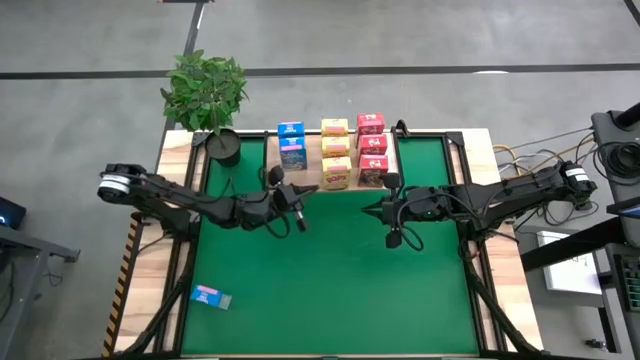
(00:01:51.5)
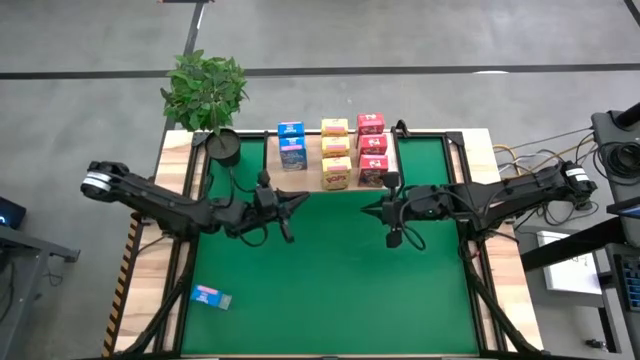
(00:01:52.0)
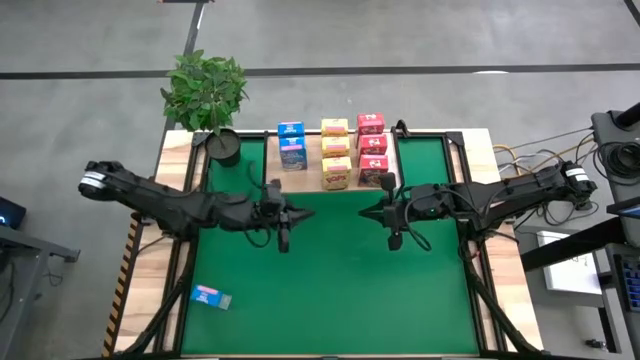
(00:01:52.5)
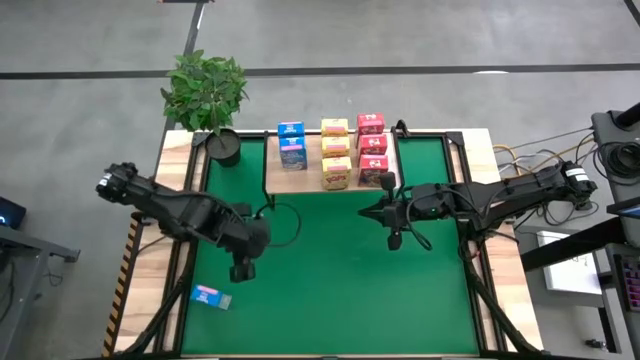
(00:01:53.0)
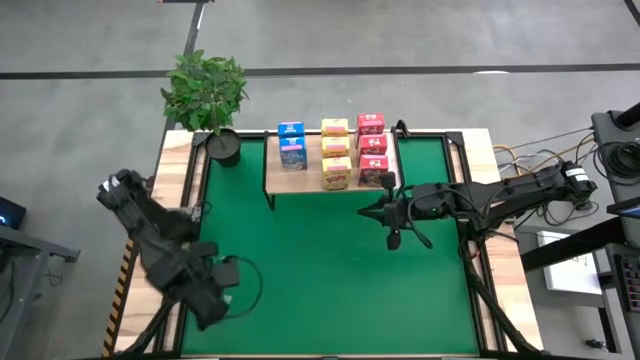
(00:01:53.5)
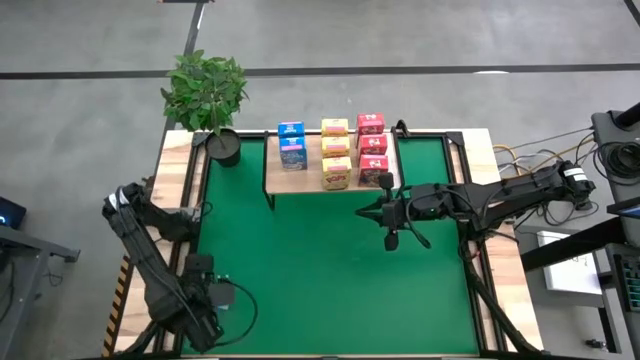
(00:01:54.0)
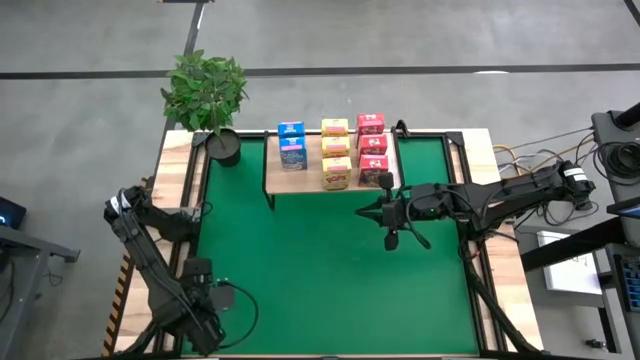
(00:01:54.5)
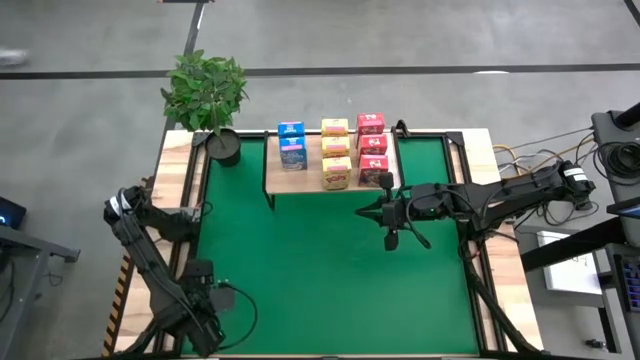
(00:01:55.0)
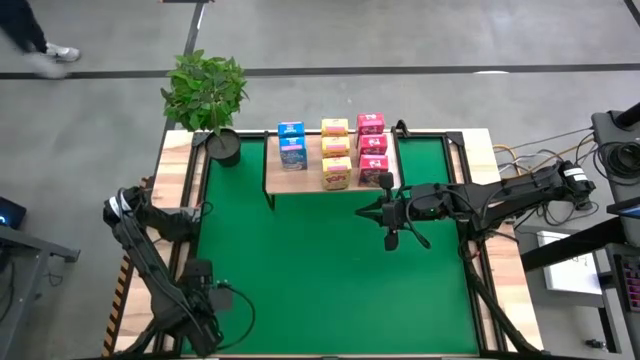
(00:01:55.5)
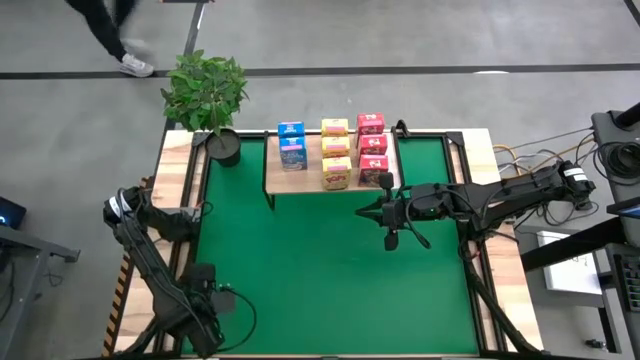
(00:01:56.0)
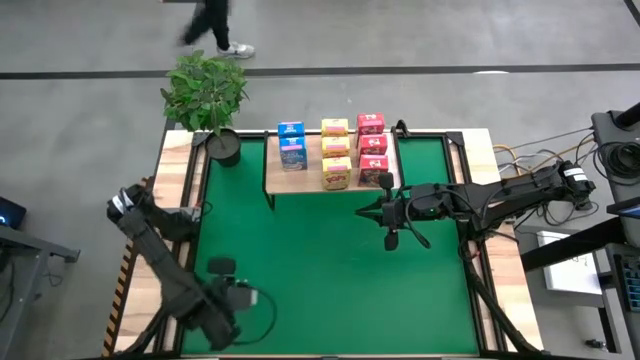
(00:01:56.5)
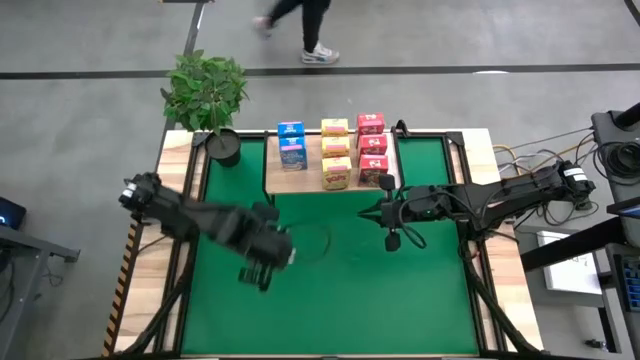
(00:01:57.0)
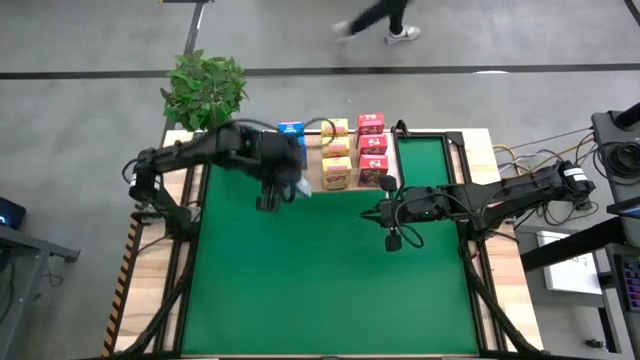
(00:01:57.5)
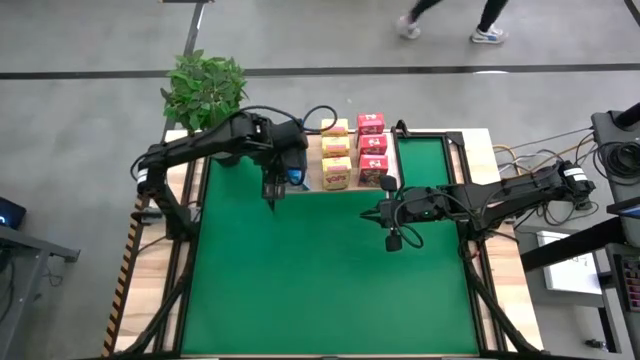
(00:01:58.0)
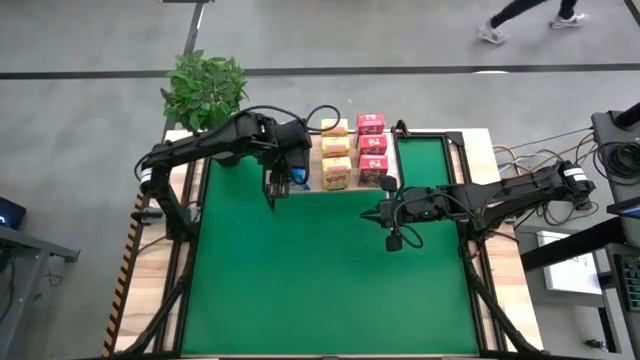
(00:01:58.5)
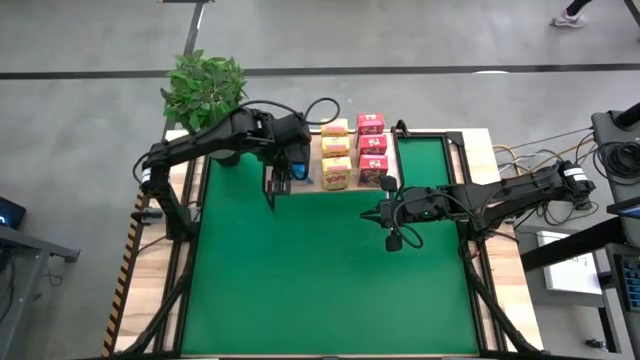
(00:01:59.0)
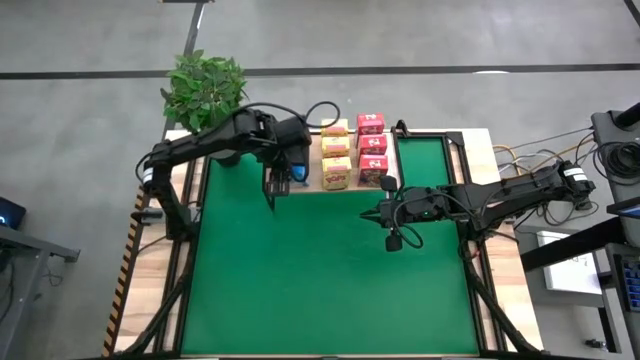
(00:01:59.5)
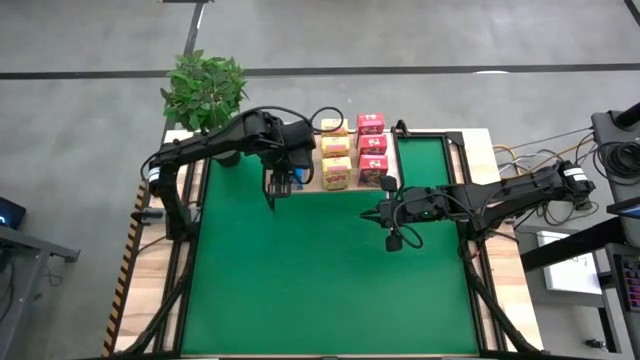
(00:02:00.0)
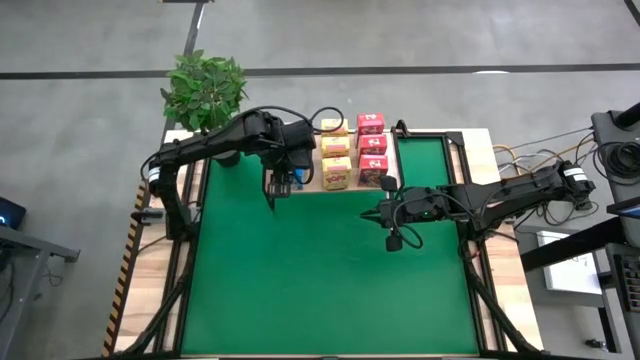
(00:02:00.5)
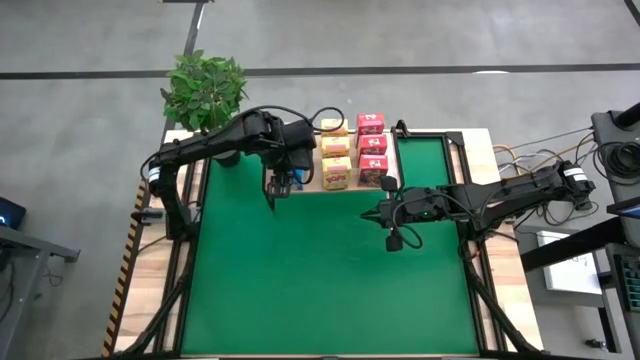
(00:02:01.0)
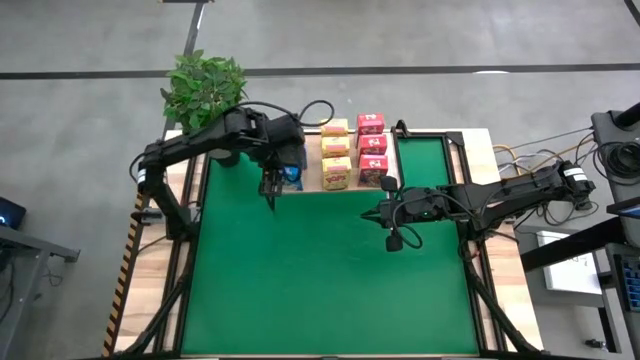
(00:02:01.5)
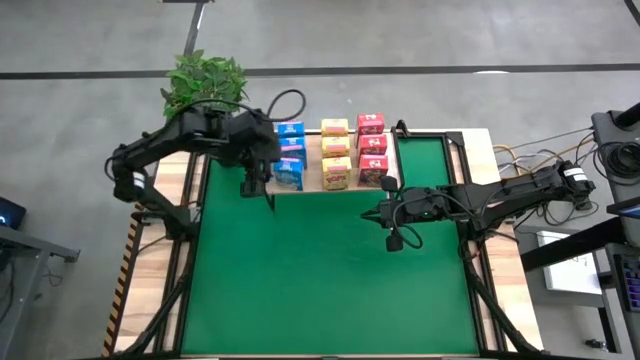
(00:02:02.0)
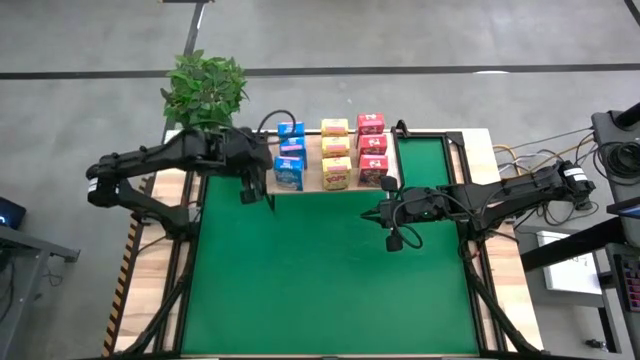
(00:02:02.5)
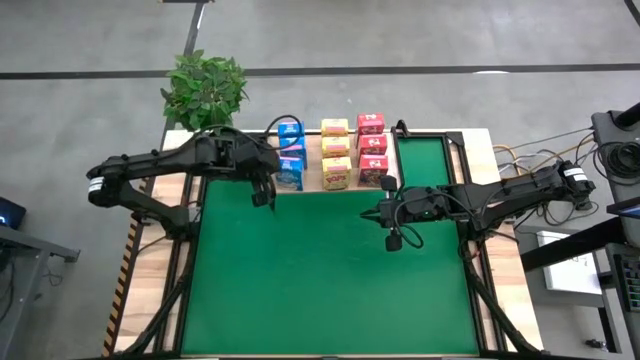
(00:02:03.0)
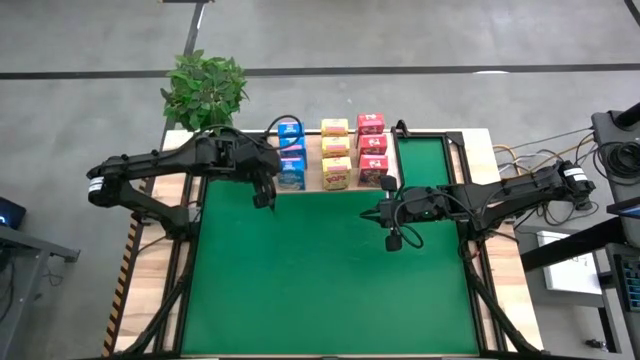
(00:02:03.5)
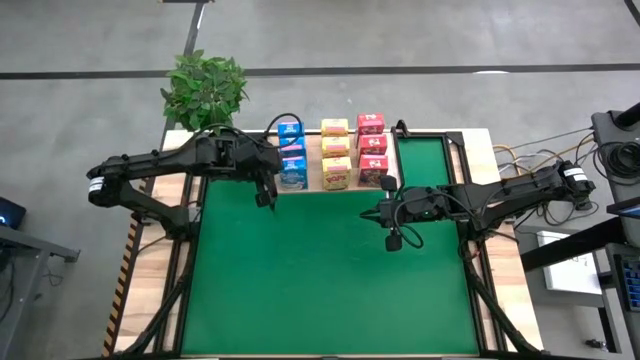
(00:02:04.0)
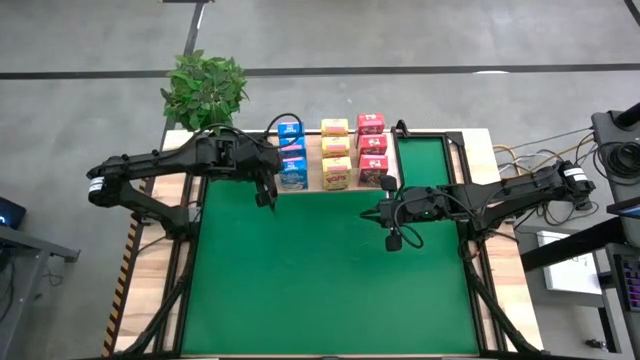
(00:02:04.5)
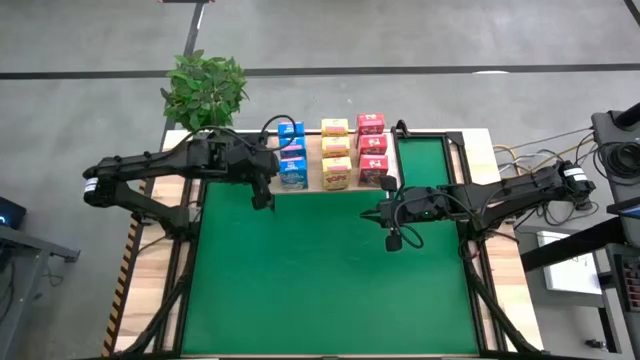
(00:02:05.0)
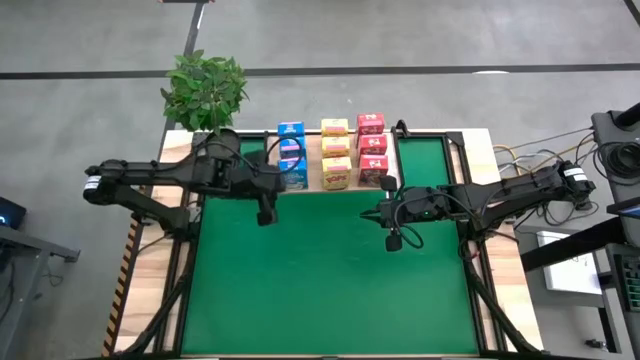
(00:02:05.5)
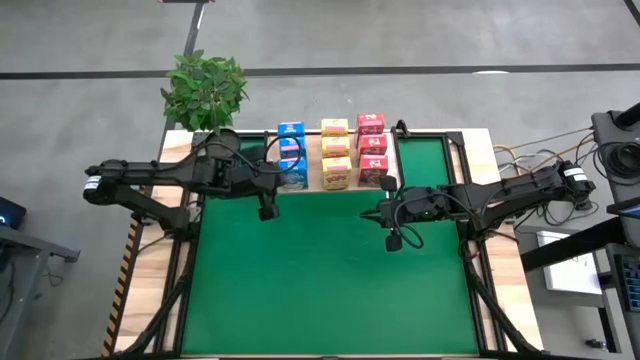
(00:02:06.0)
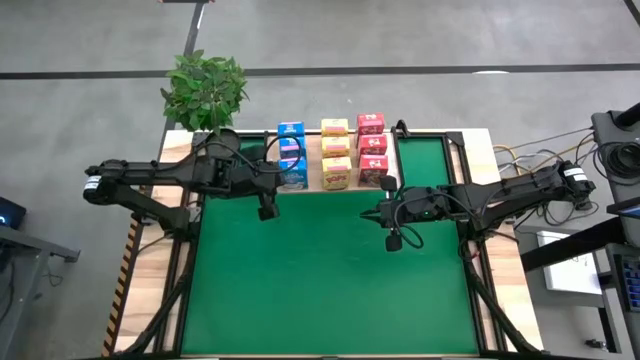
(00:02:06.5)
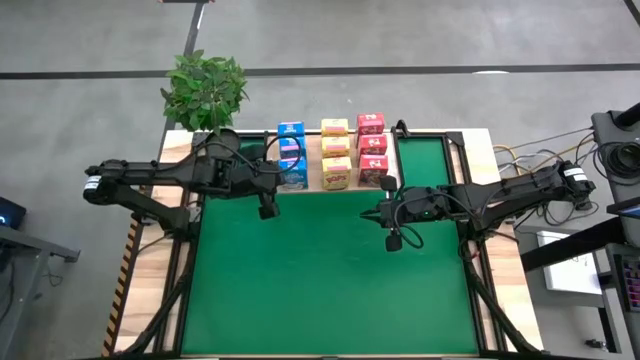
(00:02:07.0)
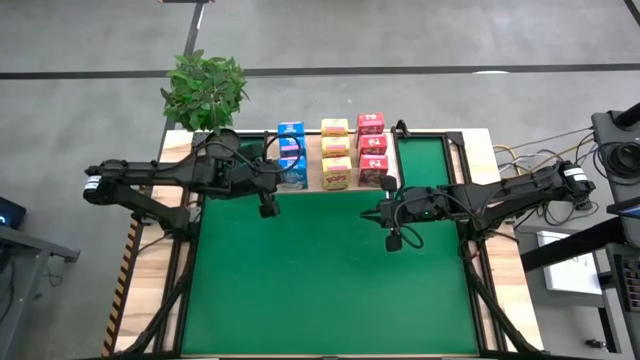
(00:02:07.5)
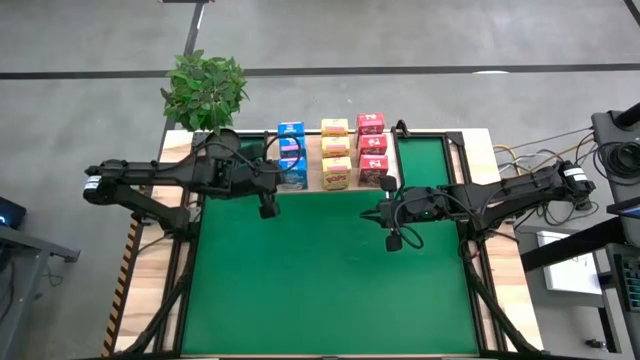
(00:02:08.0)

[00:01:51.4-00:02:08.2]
Task: Stack cereal on shelf
Put the blue cereal box on the shelf aligned with the other blue cereal boxes

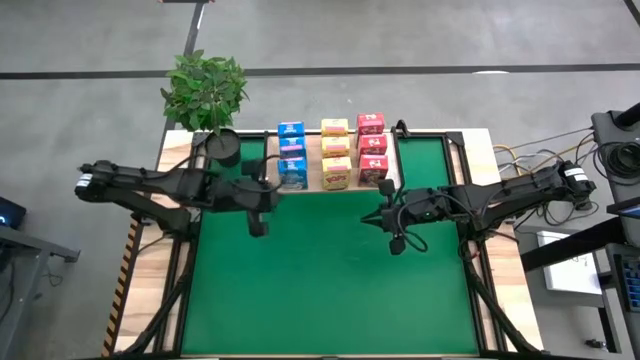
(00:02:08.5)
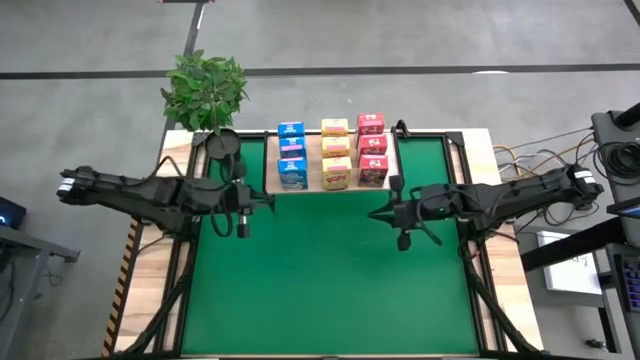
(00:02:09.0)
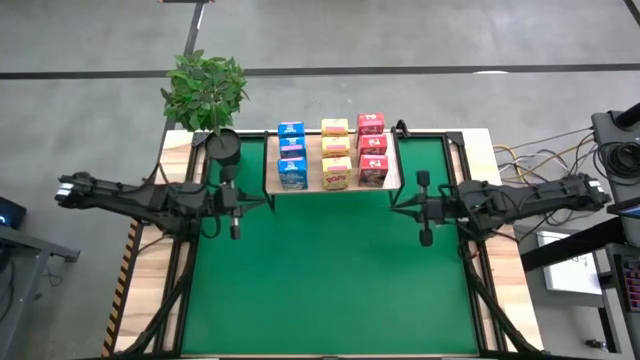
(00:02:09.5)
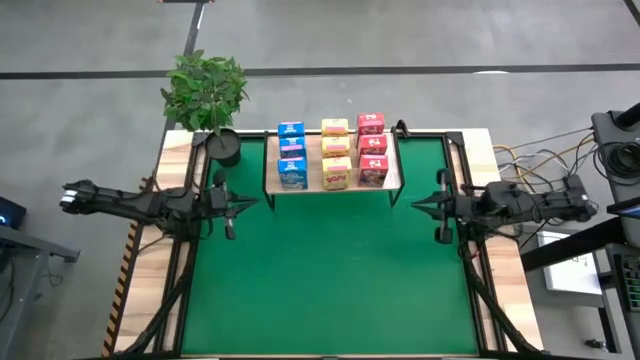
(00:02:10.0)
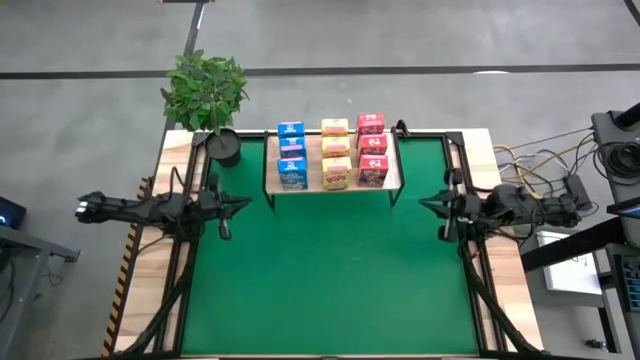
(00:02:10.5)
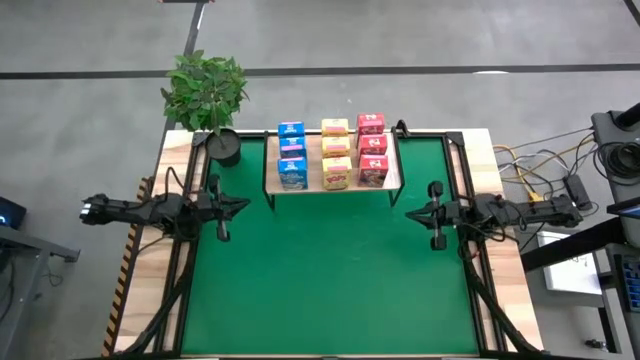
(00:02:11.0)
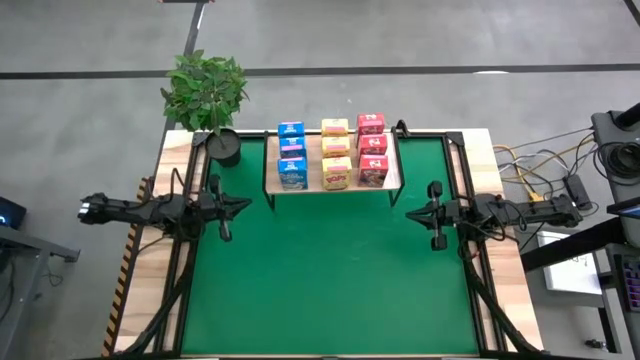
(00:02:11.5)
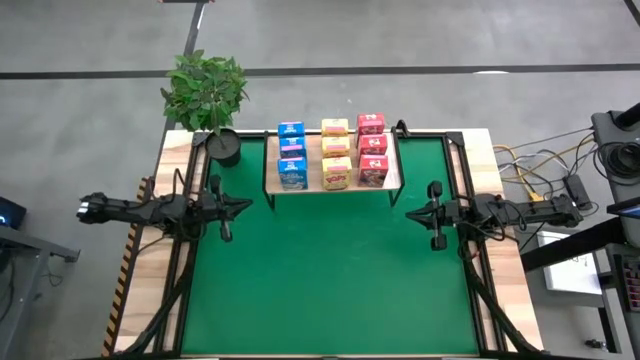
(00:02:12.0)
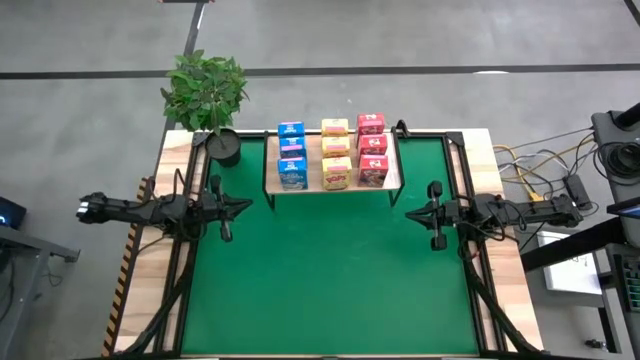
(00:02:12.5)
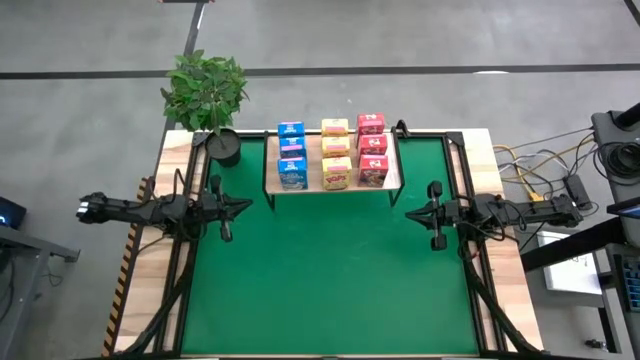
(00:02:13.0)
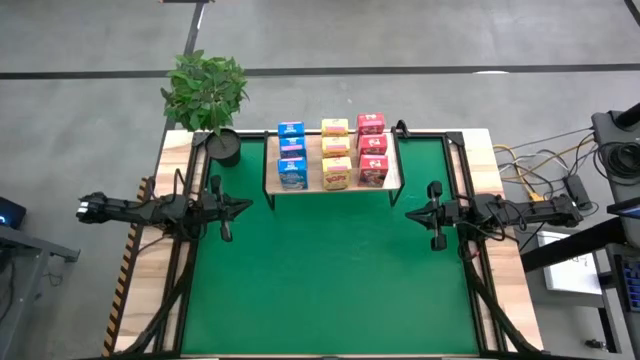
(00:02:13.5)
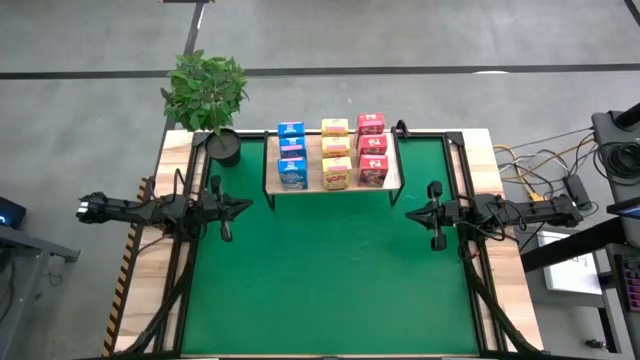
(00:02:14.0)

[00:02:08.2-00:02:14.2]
Return to Home Position
